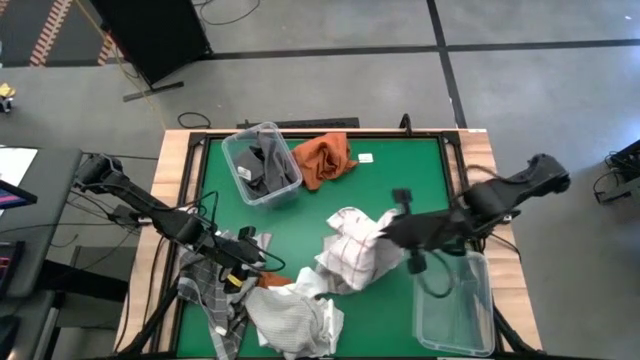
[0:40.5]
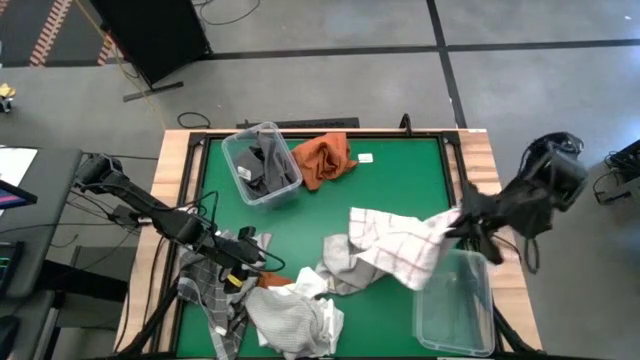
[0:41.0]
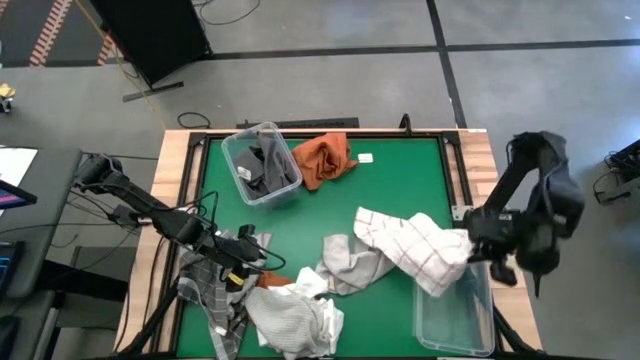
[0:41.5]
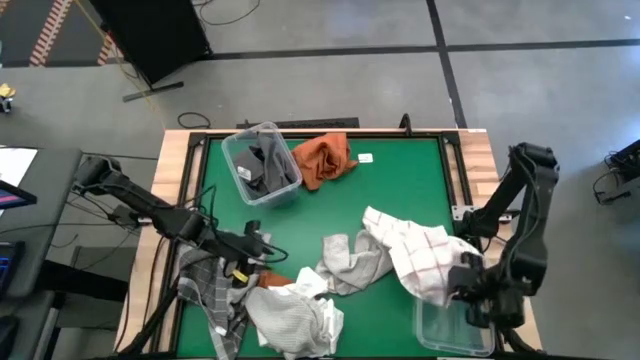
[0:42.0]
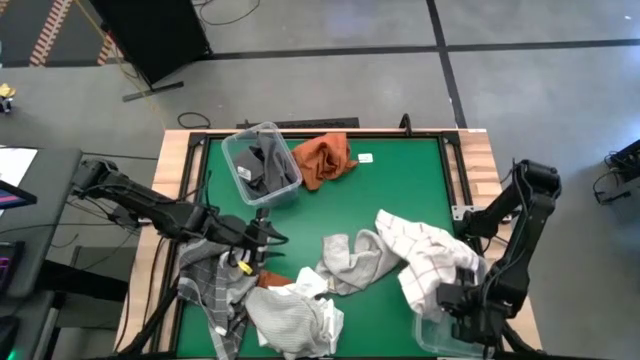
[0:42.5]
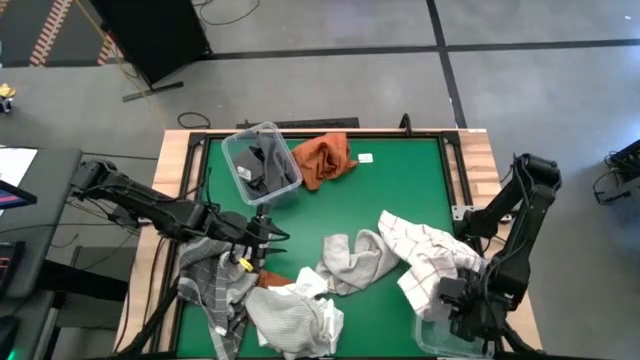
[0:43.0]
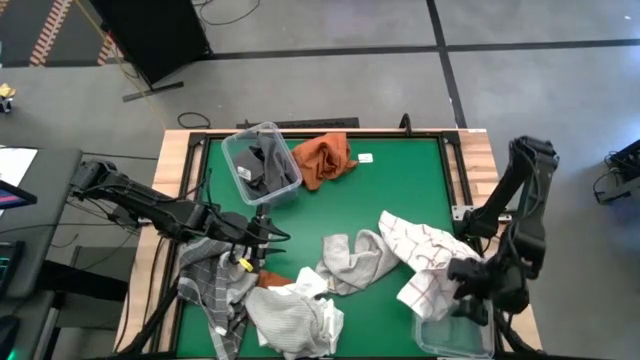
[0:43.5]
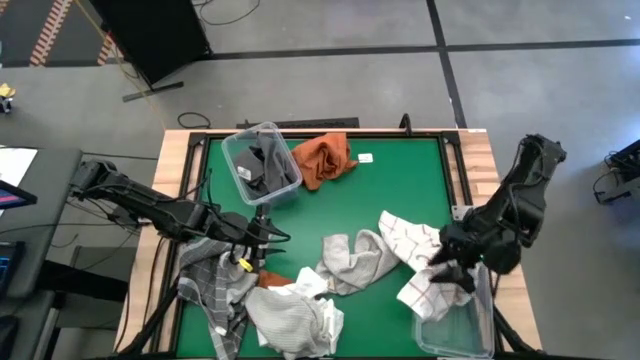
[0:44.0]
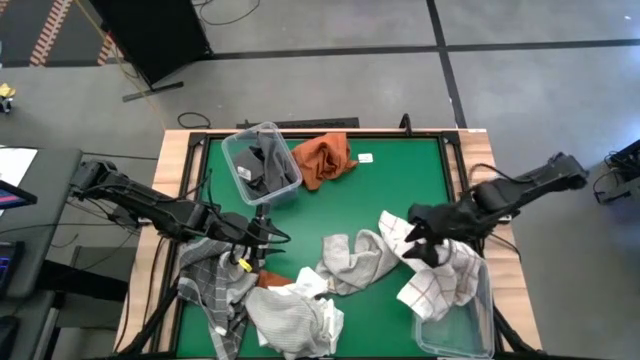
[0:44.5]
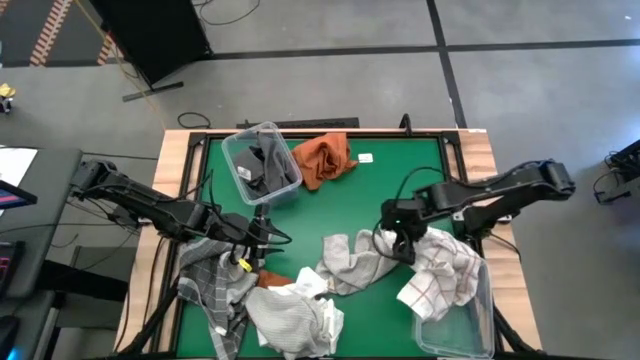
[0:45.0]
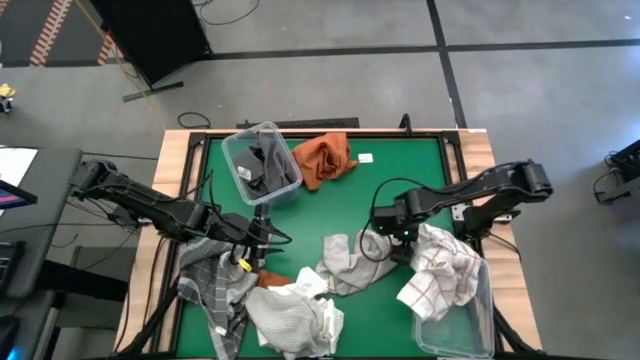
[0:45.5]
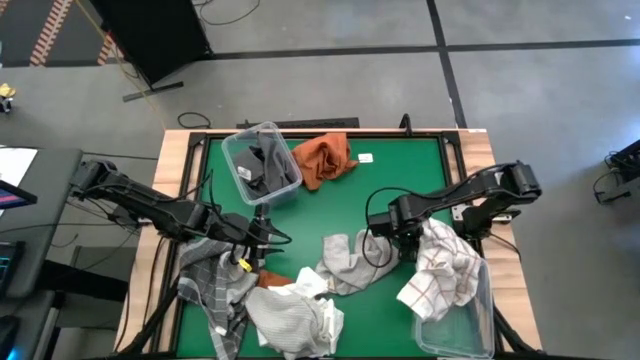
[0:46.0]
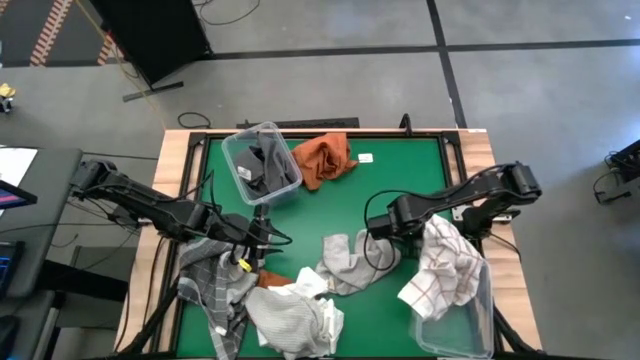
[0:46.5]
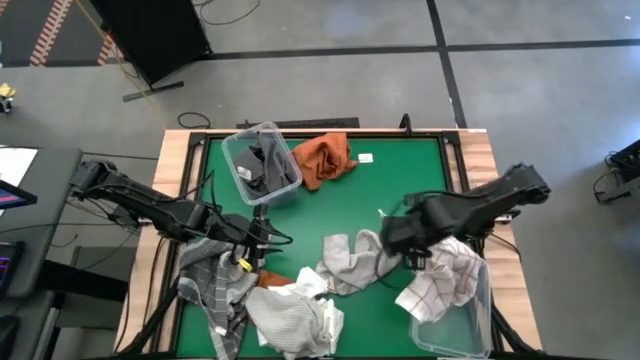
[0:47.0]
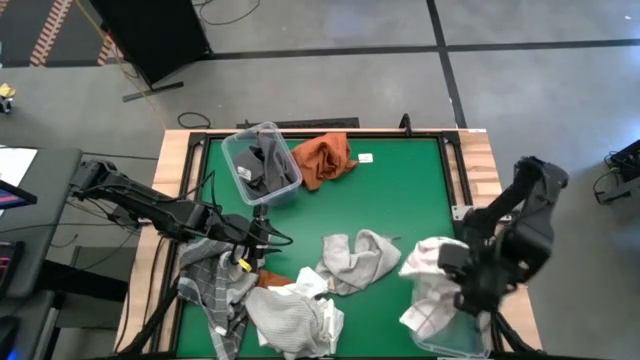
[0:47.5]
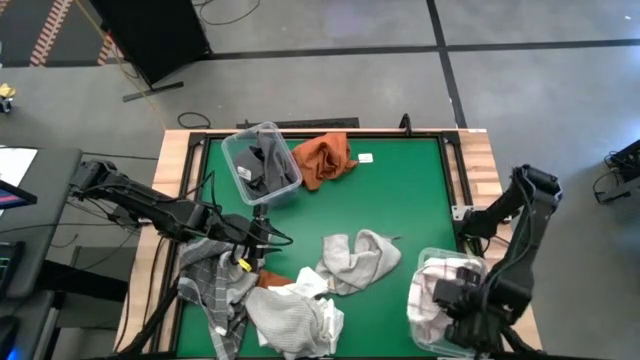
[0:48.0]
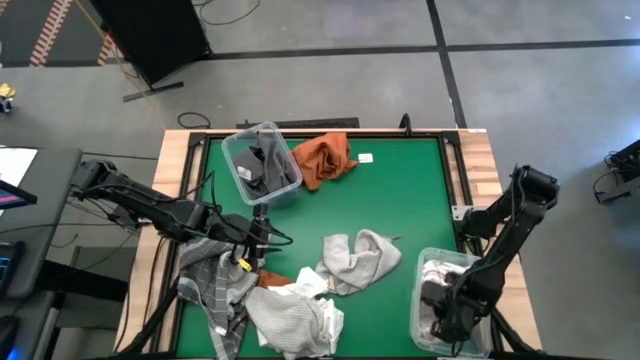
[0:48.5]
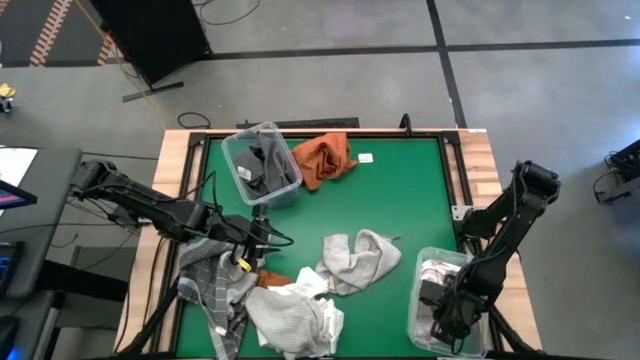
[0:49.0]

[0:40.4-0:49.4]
Task: Sort towels by color in basket
Put the white patterned towel into the bottom transparent bin

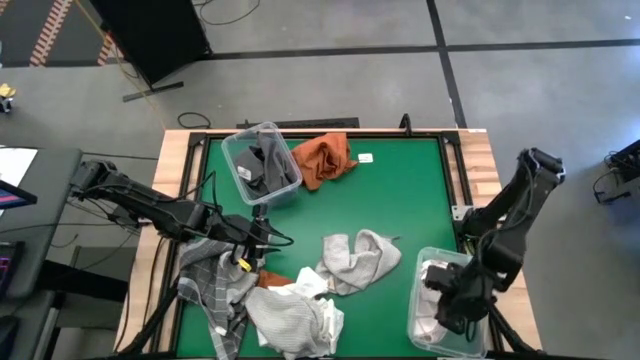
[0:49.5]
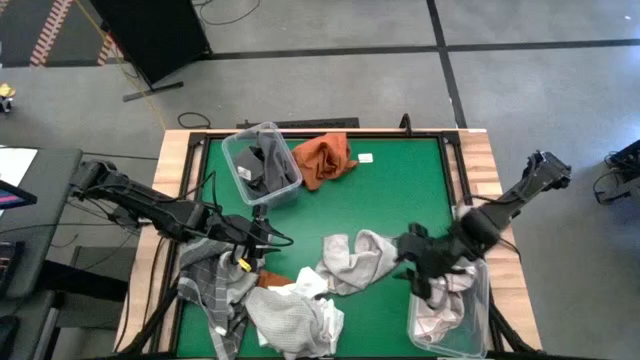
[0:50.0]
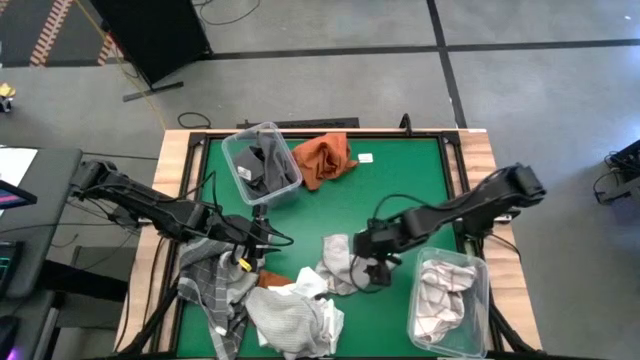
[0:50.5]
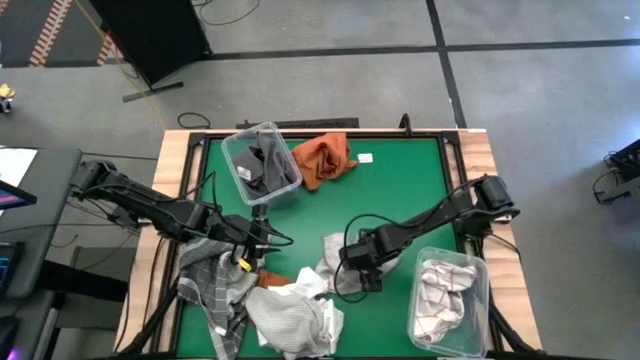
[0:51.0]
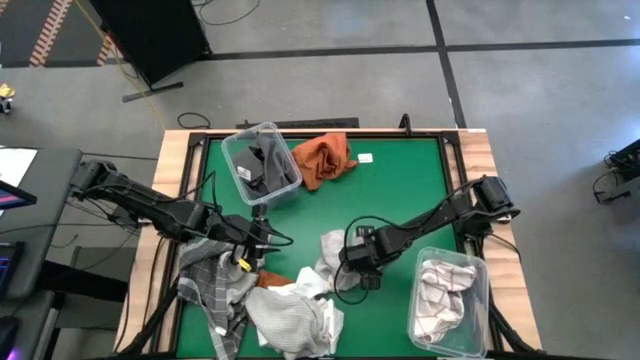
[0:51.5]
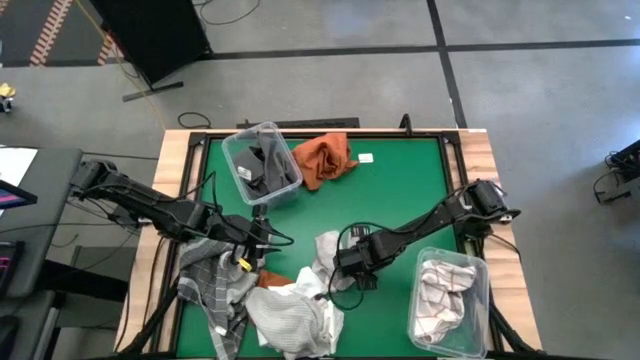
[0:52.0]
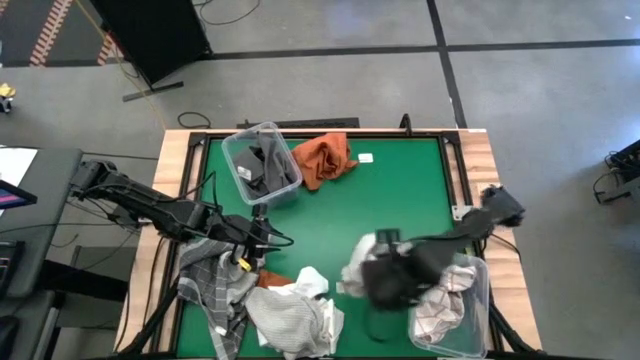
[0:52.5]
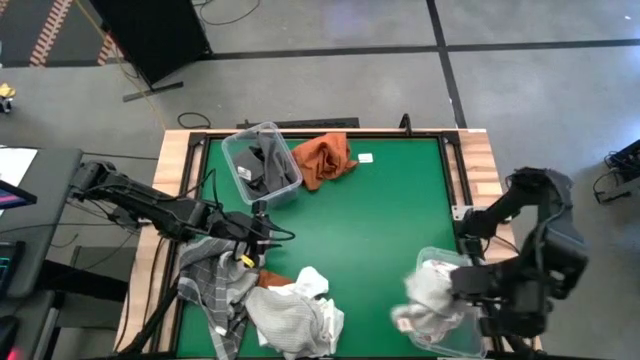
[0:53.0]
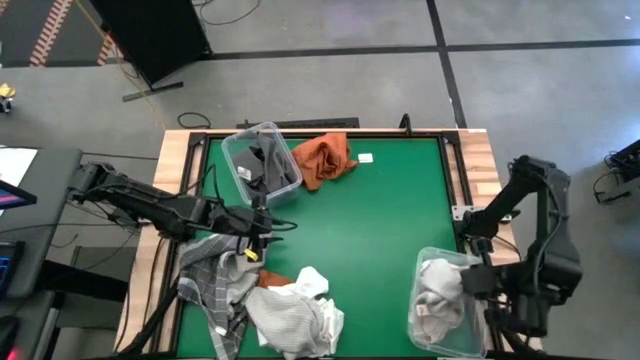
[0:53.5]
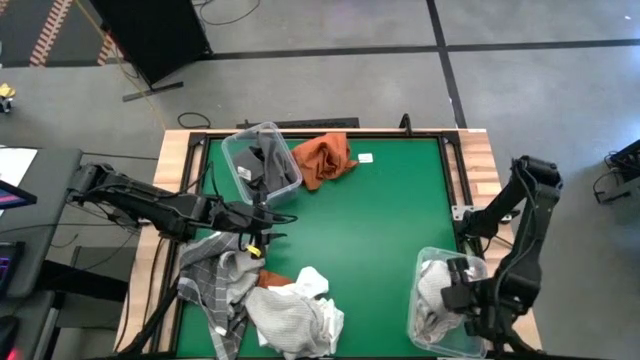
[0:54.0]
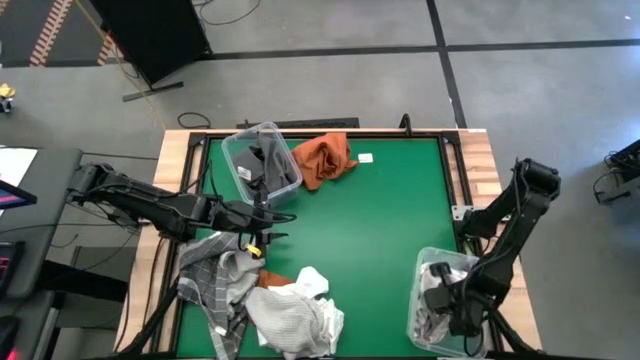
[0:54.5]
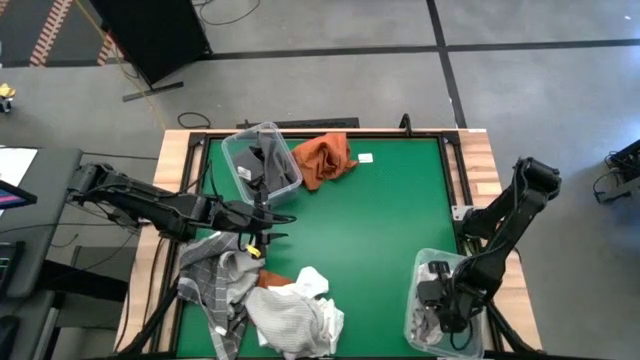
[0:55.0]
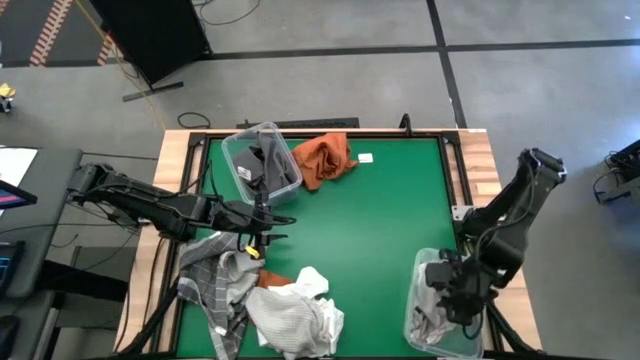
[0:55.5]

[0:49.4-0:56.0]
Put the light gray towel into the bottom transparent bin

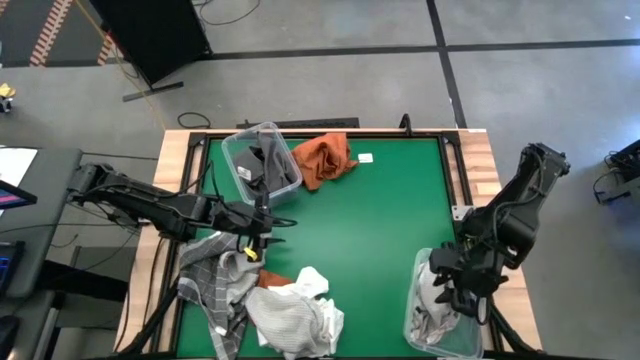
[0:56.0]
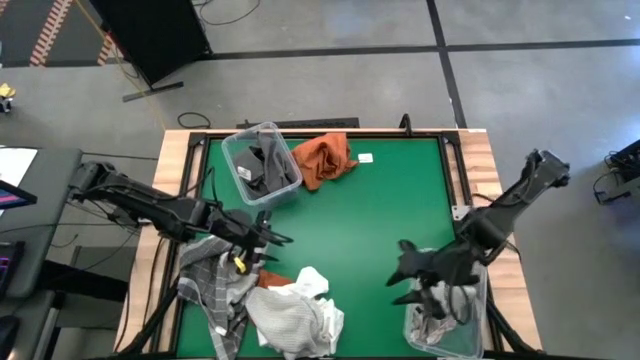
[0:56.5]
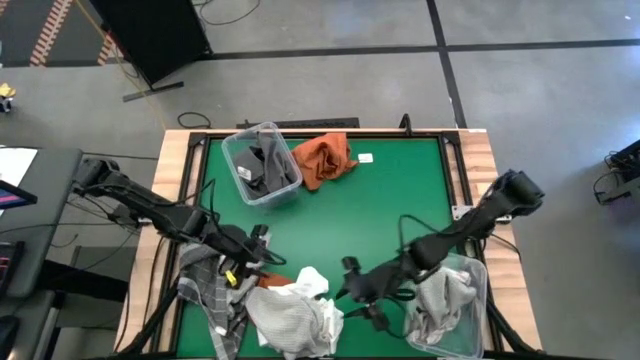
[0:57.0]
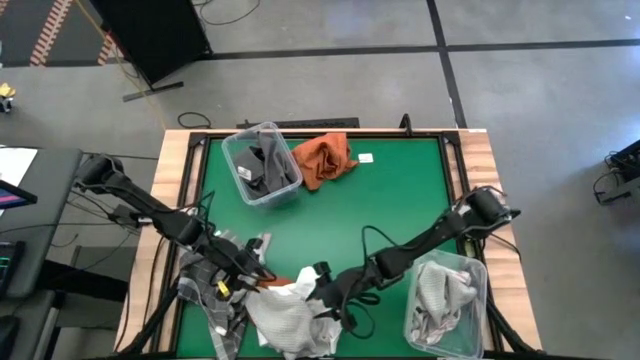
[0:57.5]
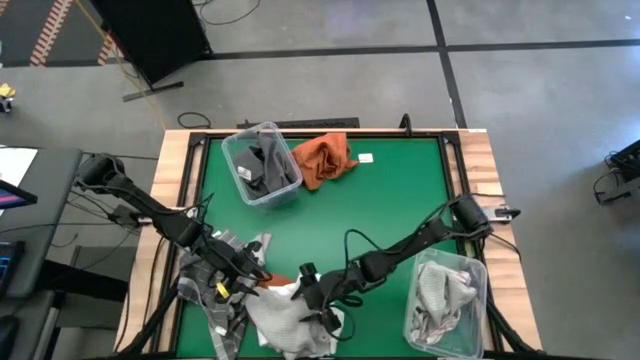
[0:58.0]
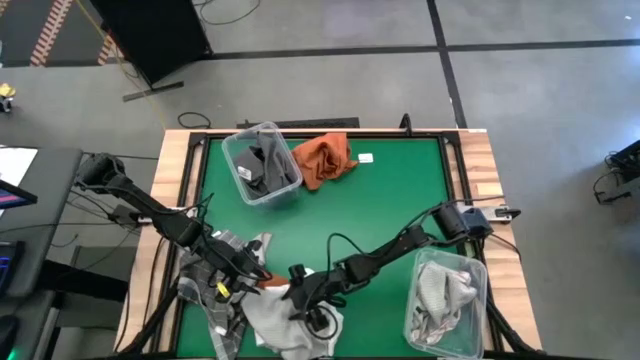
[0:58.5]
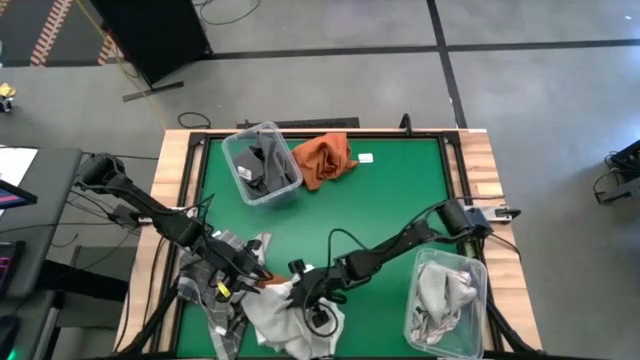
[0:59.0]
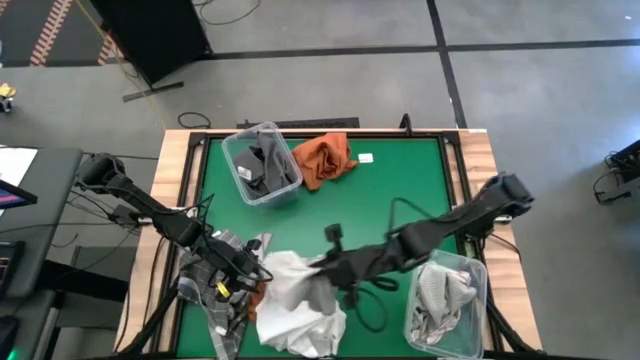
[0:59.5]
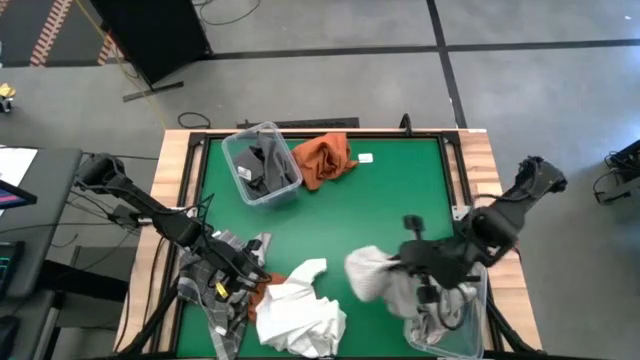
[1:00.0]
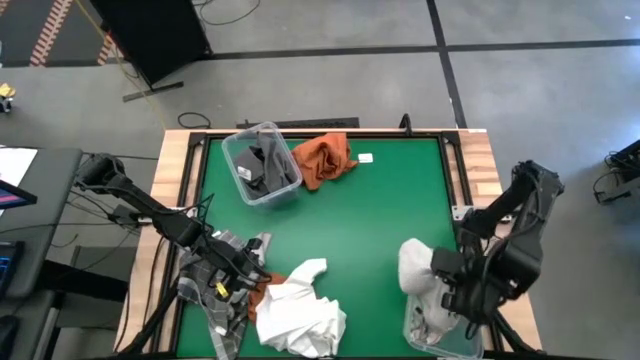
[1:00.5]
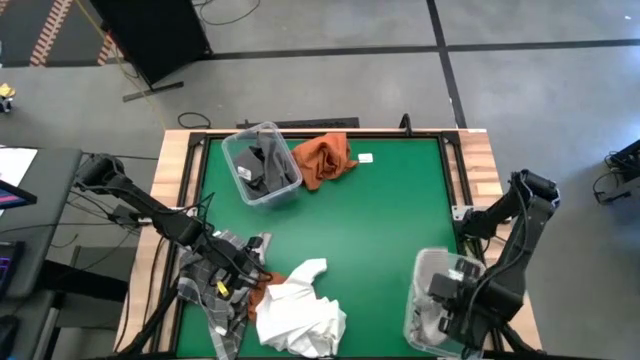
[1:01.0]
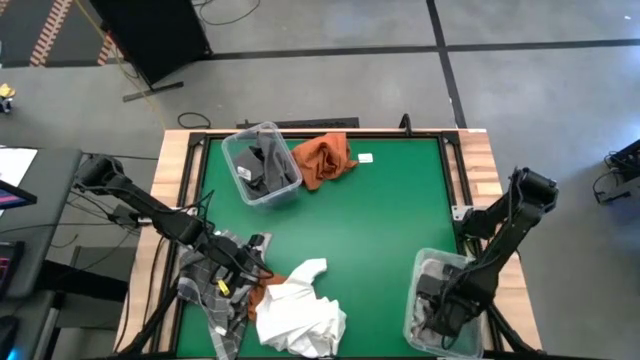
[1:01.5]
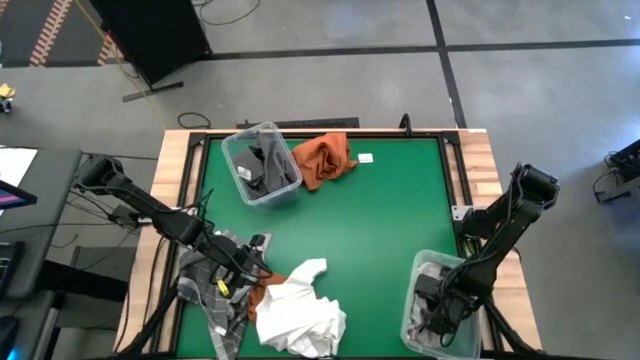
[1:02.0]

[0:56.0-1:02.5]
Put the light gray towel into the bottom transparent bin
